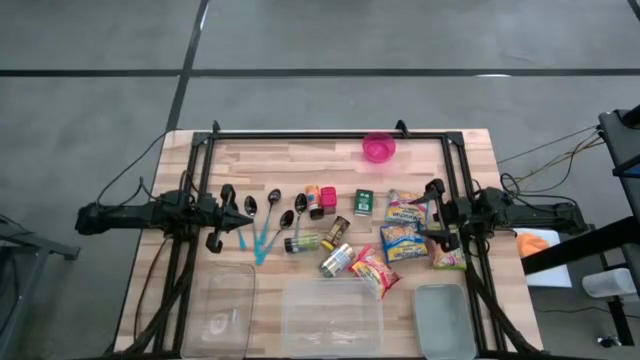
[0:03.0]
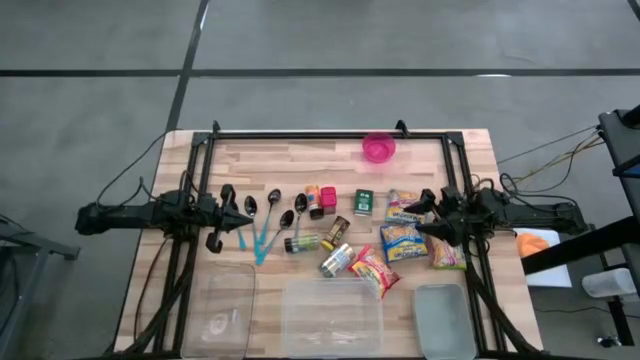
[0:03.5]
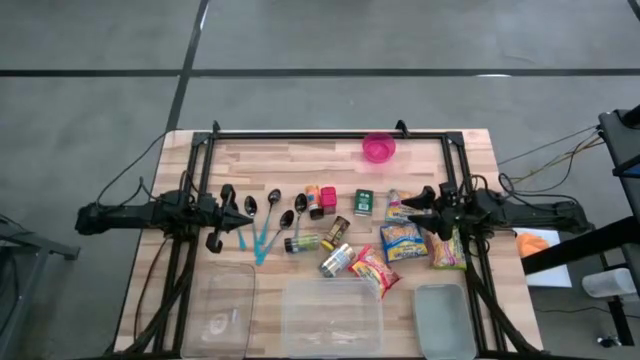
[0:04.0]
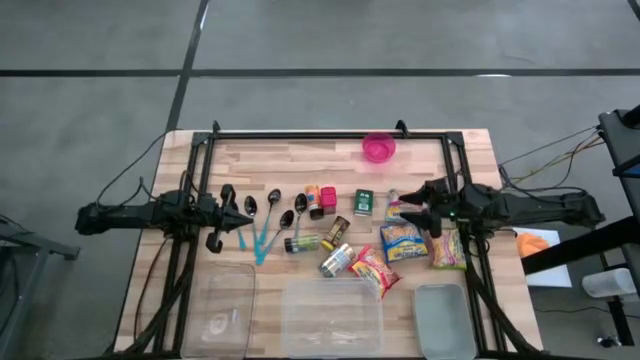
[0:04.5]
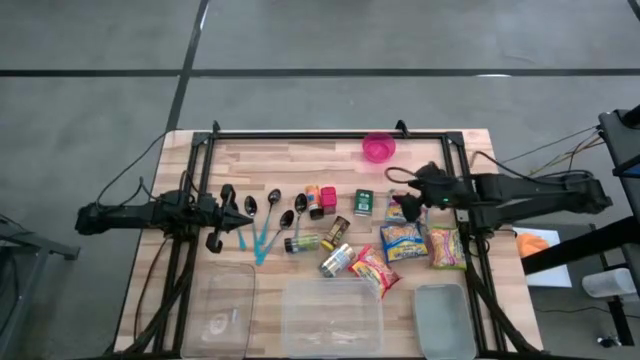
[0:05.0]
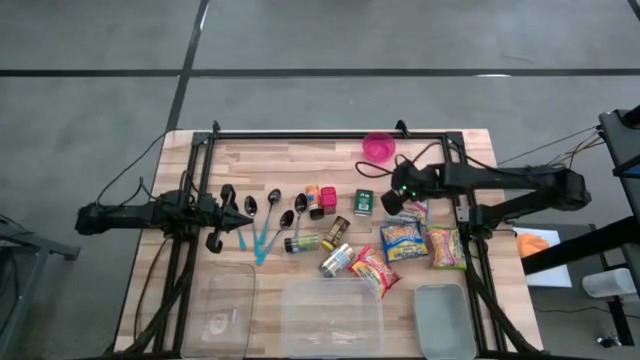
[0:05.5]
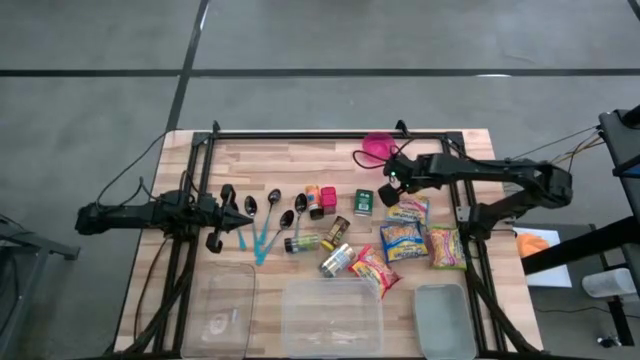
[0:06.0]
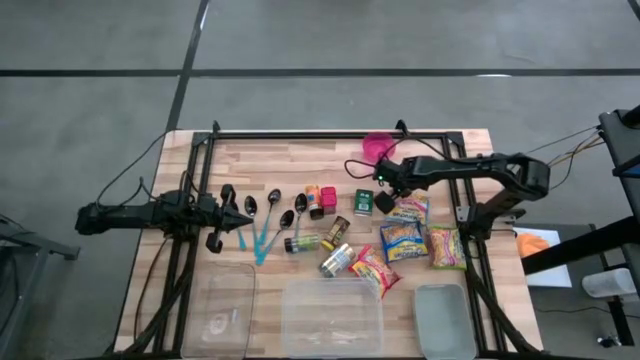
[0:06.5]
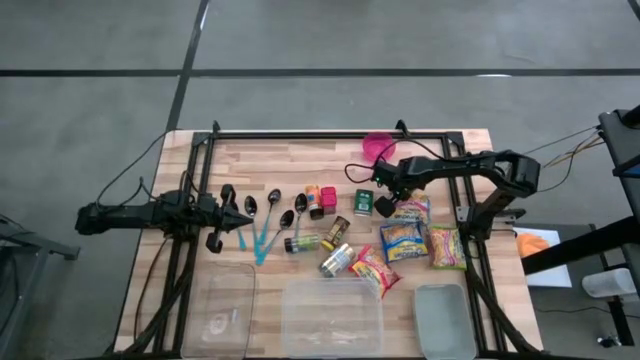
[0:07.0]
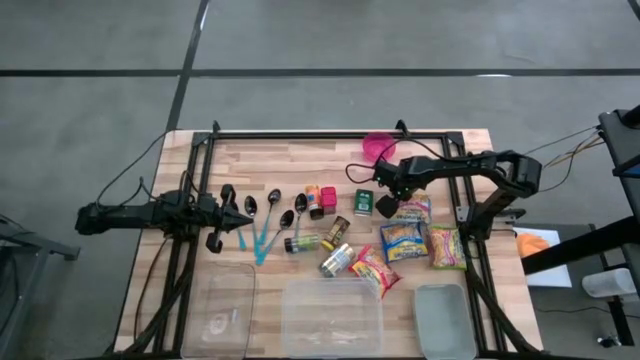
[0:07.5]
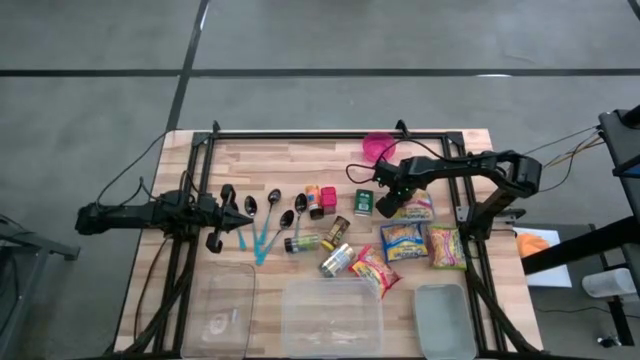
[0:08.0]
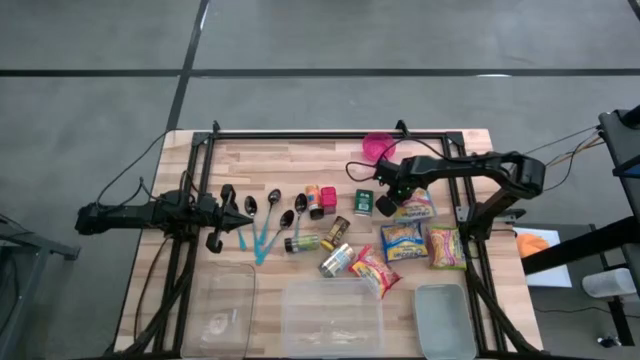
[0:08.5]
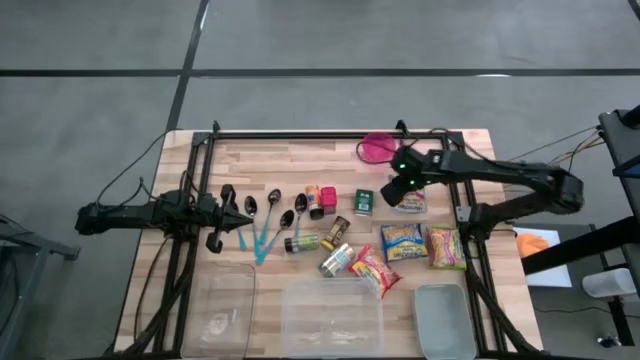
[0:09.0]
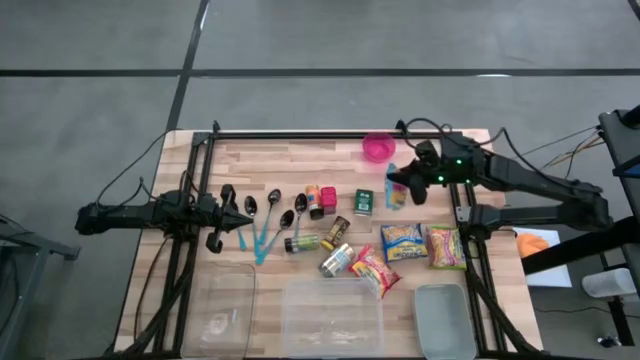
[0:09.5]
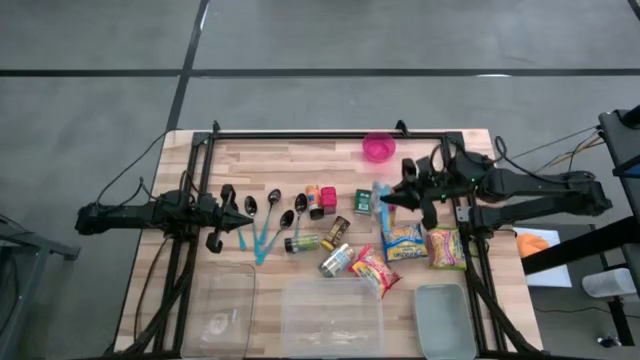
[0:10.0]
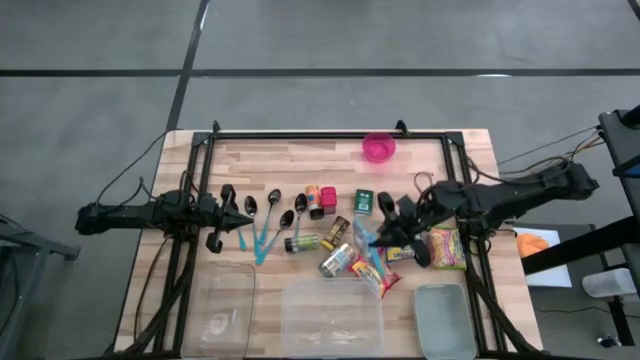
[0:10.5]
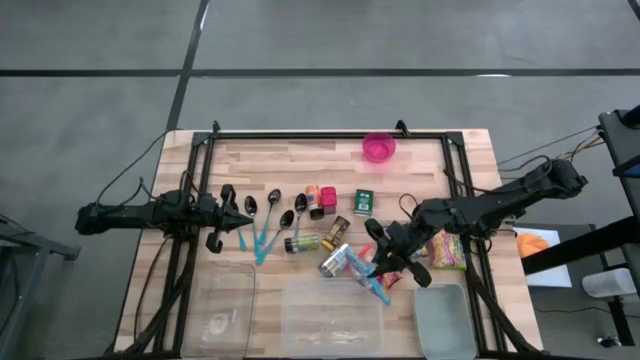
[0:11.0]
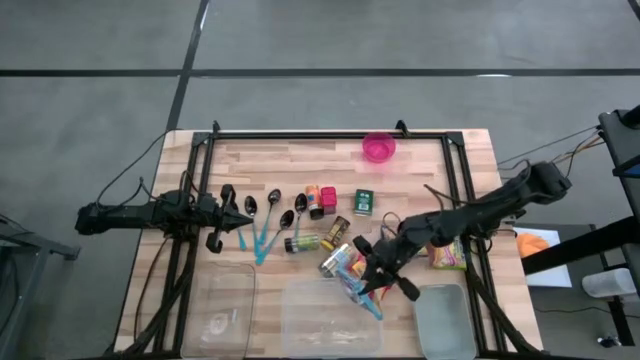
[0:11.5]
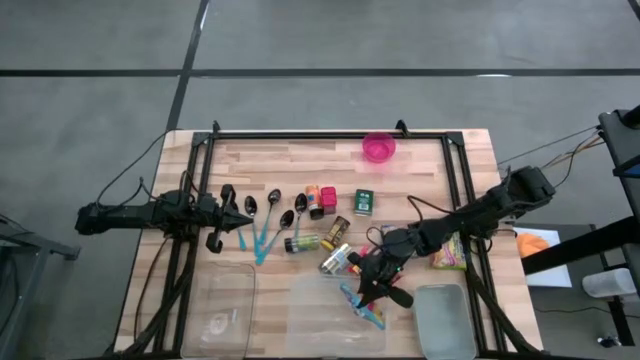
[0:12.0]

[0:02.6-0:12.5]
Put the light blue noodle pack into the white bin

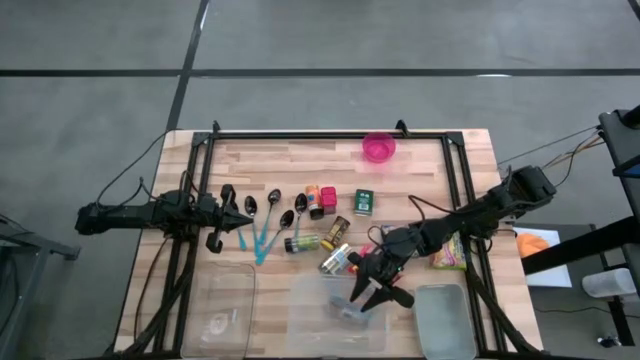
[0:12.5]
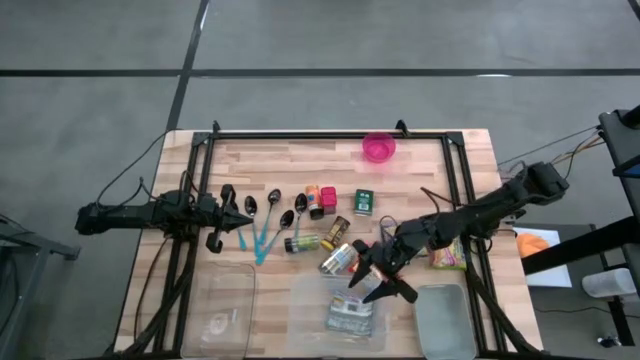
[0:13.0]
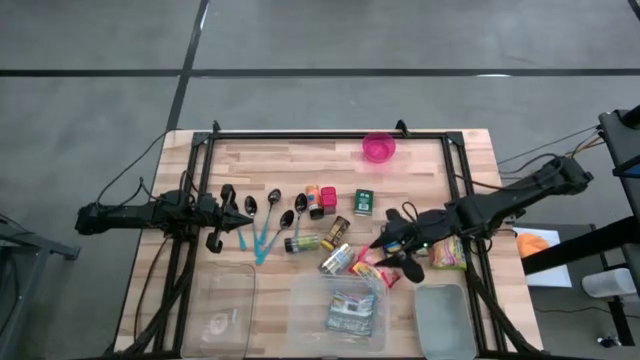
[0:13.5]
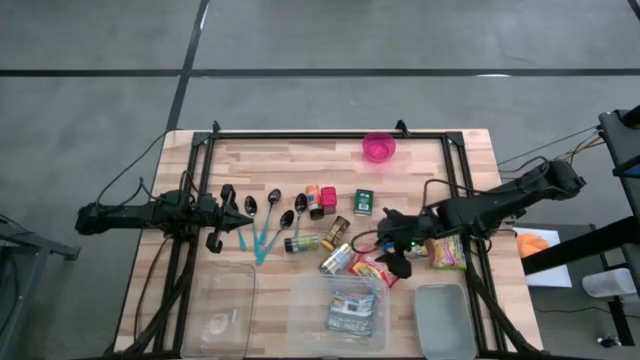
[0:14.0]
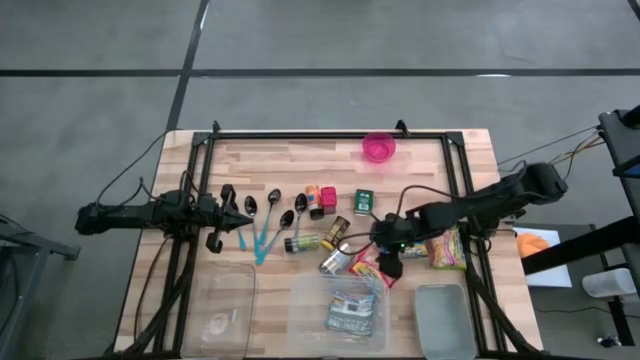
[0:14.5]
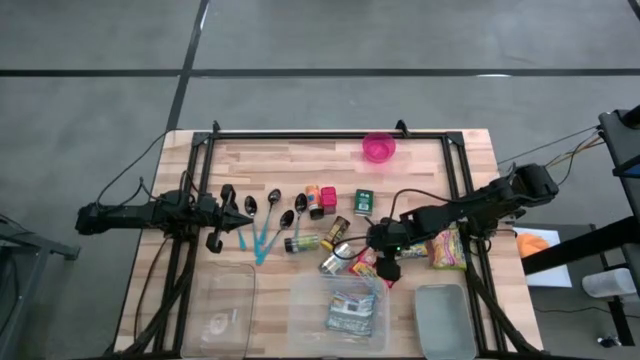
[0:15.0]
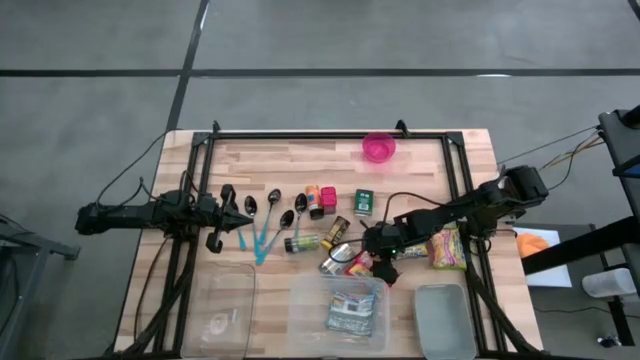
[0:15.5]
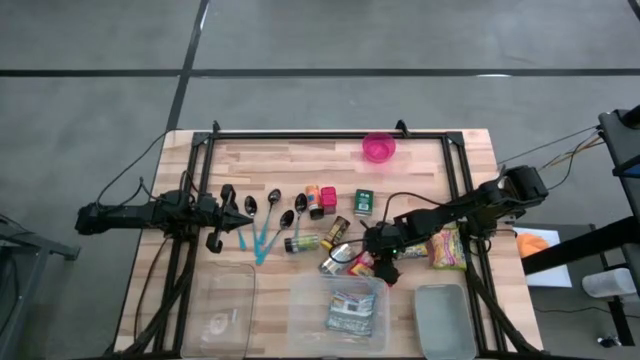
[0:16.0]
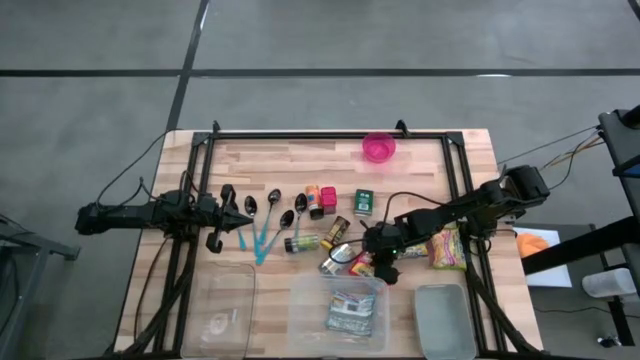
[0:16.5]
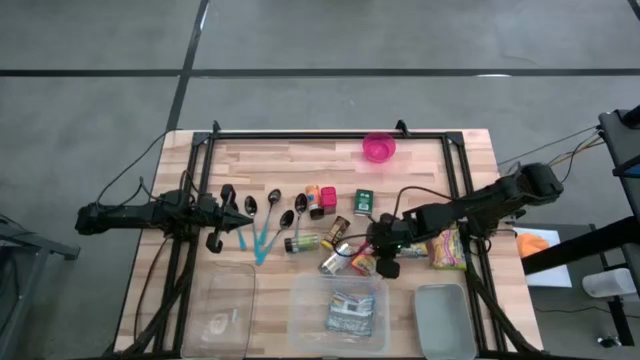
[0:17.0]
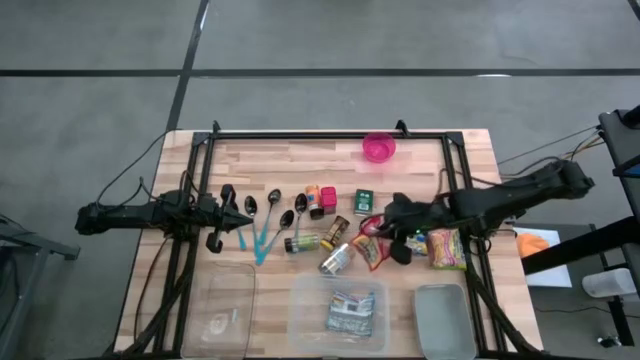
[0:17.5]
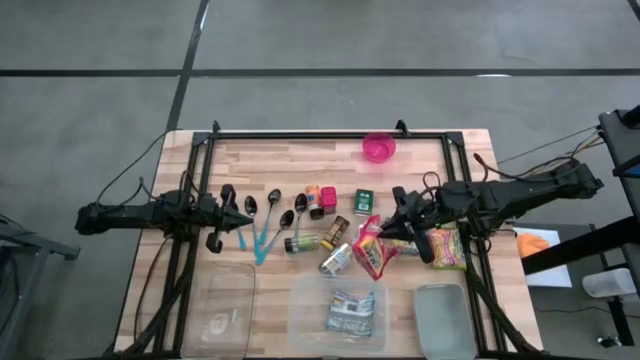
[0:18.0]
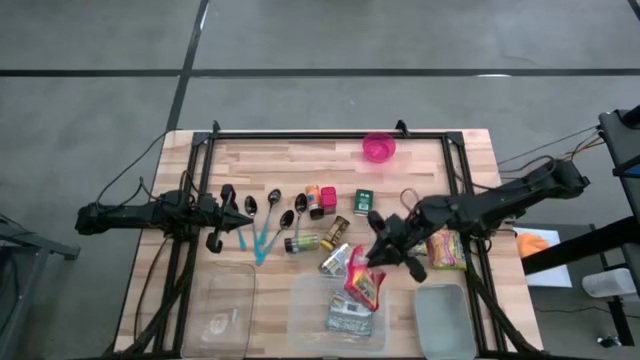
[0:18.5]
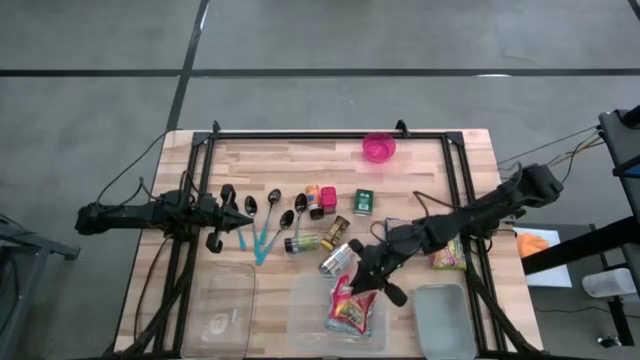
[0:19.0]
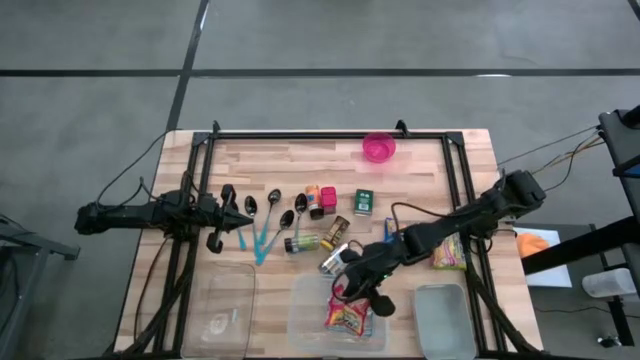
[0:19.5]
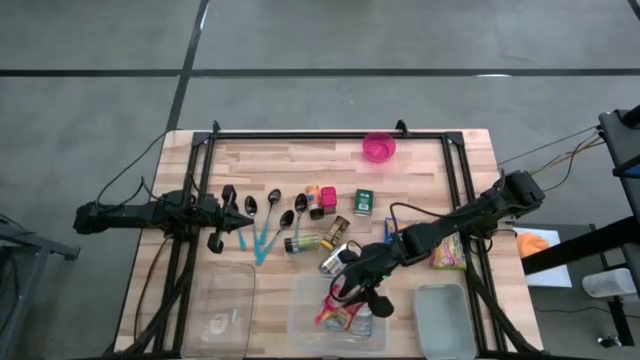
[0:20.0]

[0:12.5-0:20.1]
Put the red noodle pack into the white bin

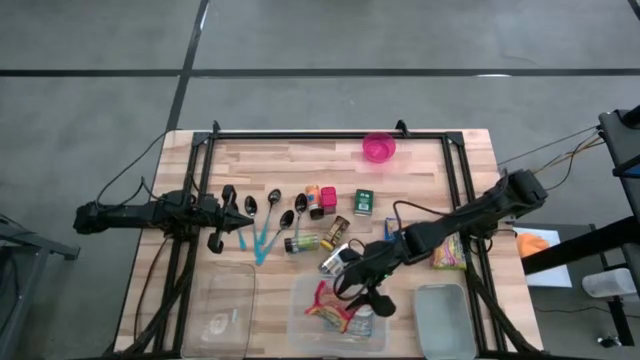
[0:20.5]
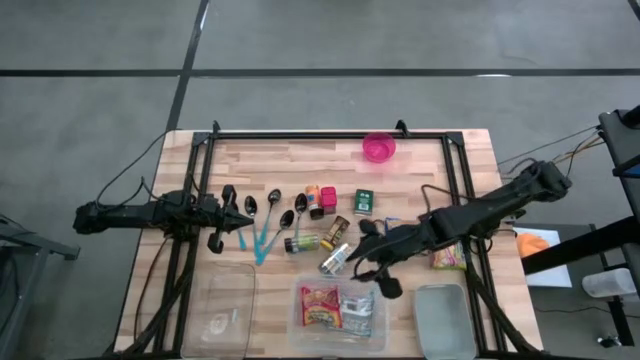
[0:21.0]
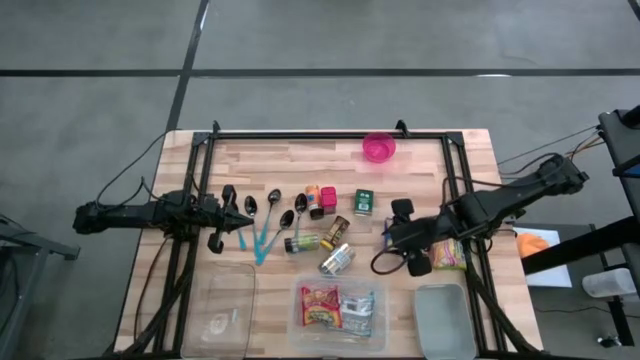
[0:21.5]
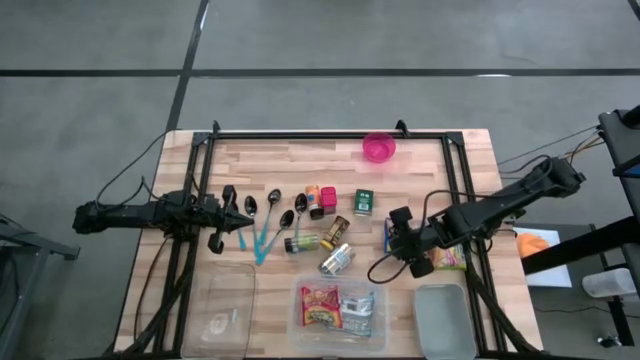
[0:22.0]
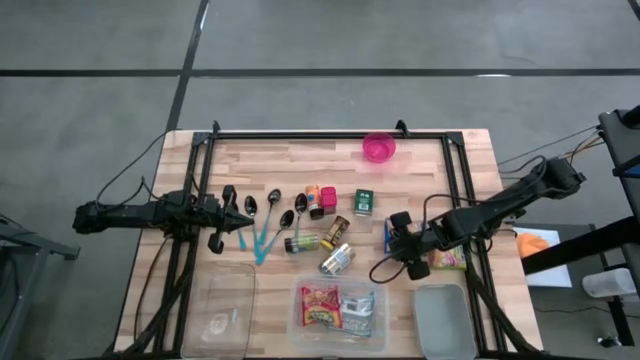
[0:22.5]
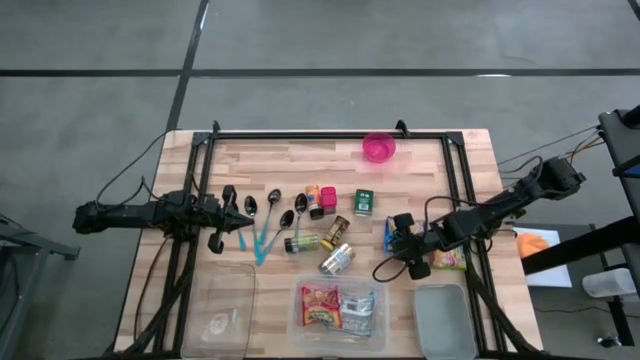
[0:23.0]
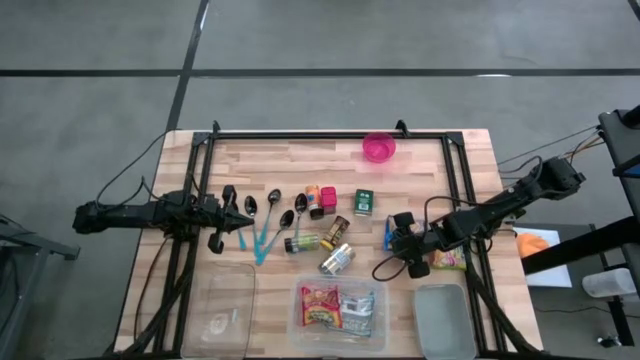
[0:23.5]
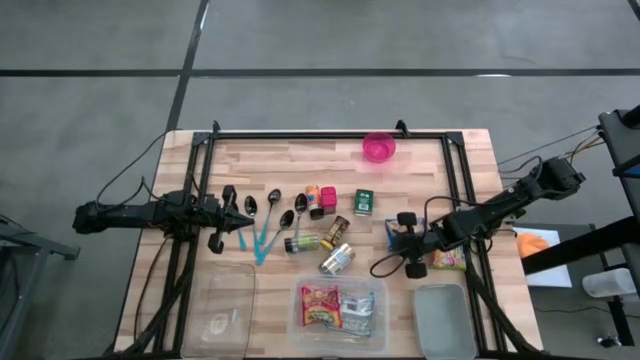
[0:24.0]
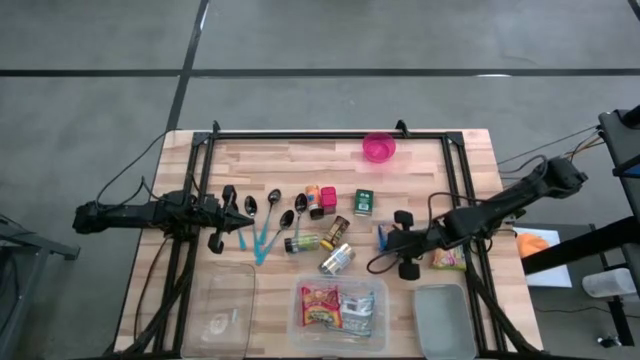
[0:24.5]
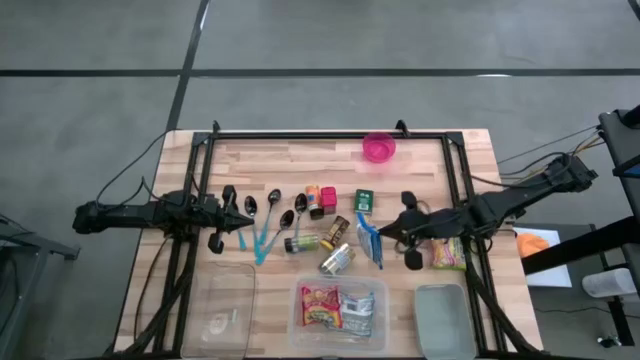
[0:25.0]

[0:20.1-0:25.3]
Put the blue noodle pack into the white bin
